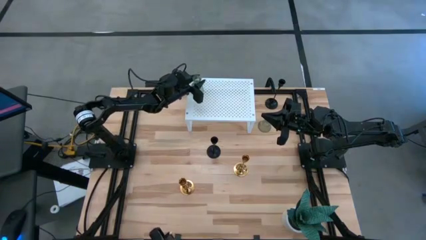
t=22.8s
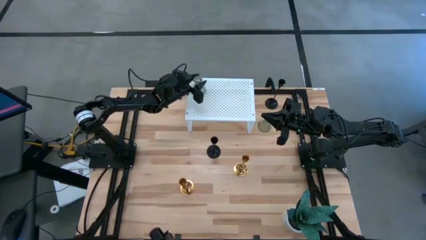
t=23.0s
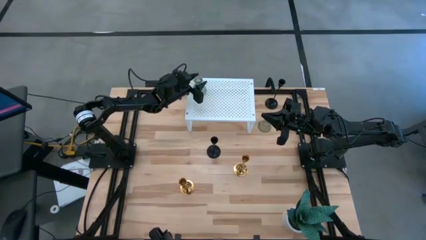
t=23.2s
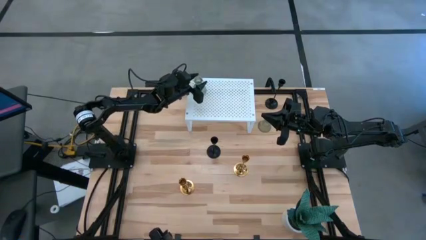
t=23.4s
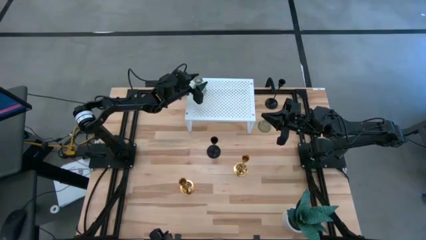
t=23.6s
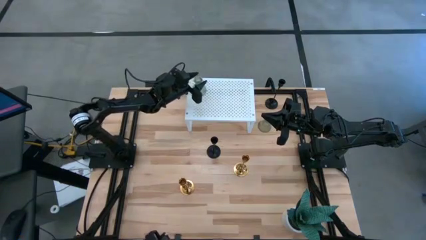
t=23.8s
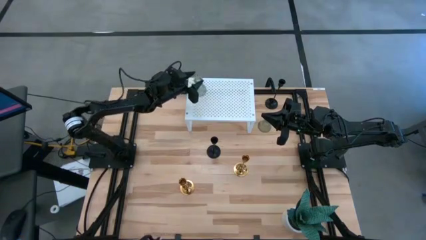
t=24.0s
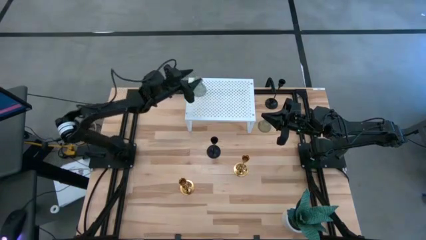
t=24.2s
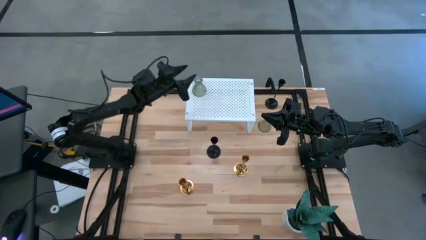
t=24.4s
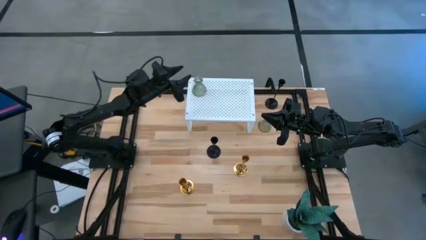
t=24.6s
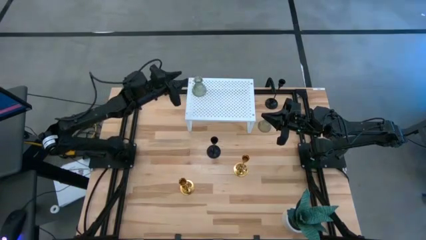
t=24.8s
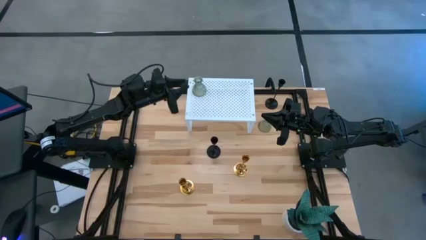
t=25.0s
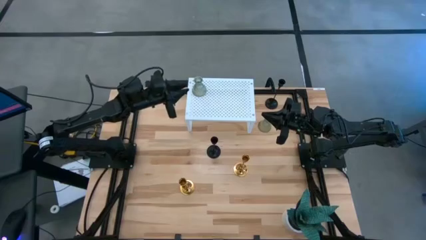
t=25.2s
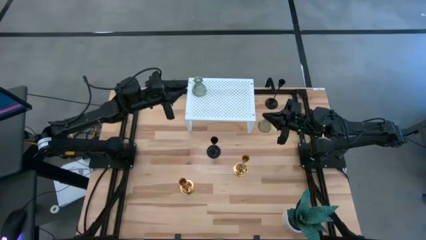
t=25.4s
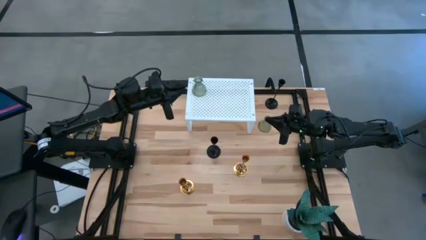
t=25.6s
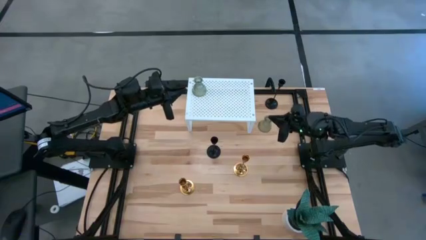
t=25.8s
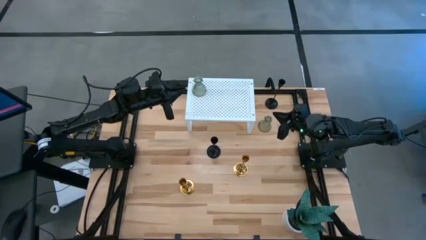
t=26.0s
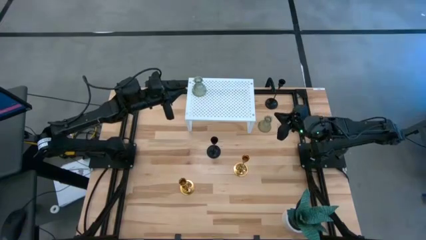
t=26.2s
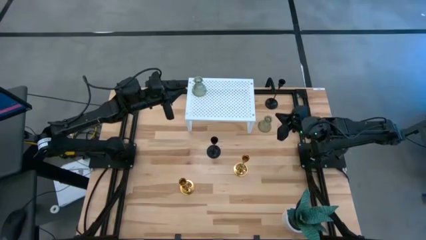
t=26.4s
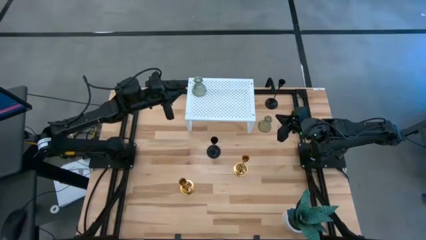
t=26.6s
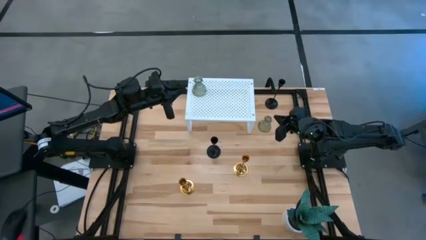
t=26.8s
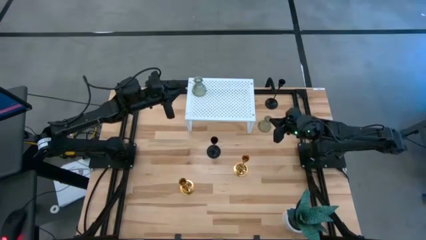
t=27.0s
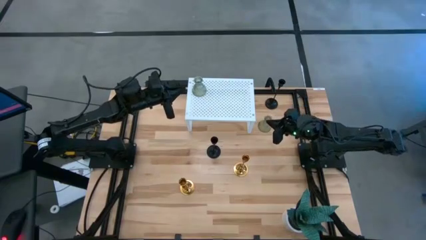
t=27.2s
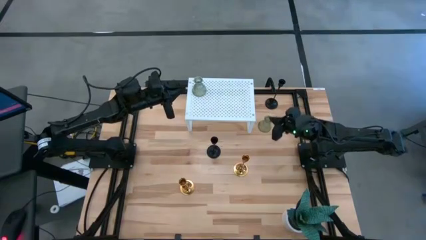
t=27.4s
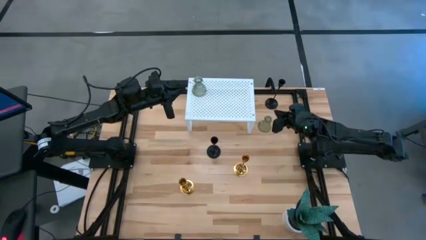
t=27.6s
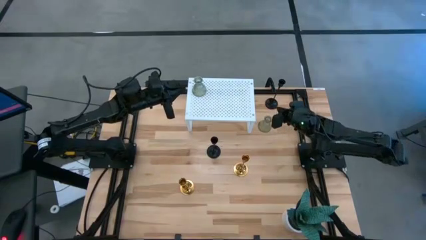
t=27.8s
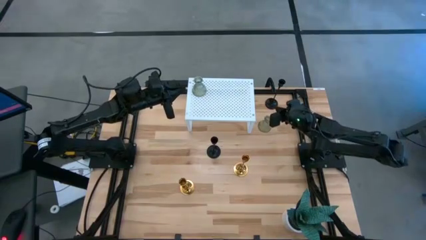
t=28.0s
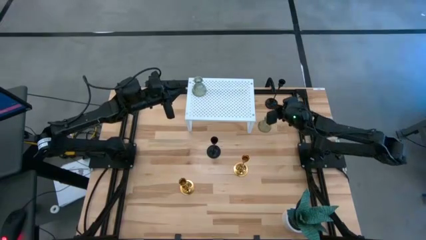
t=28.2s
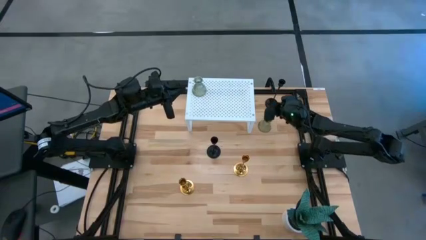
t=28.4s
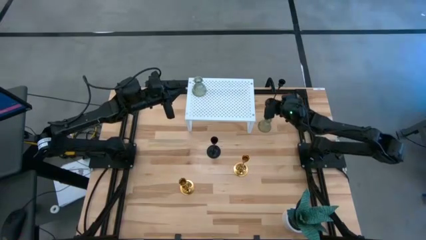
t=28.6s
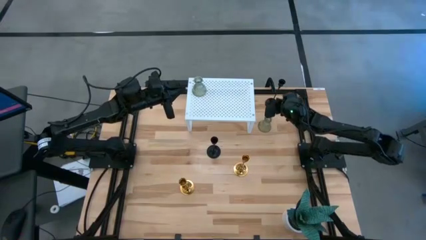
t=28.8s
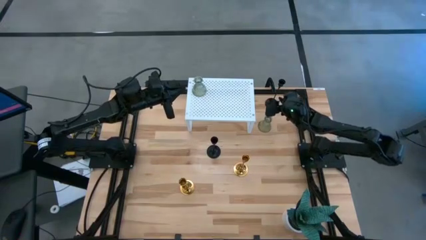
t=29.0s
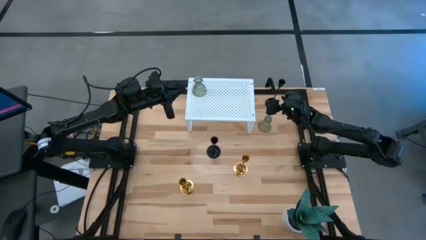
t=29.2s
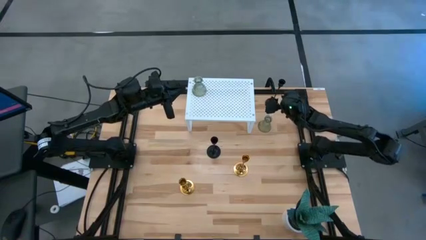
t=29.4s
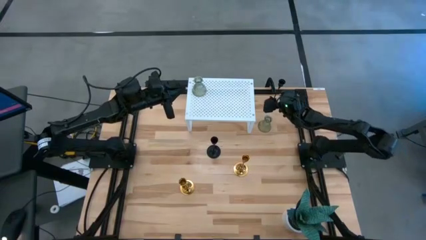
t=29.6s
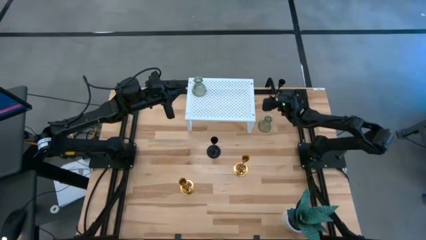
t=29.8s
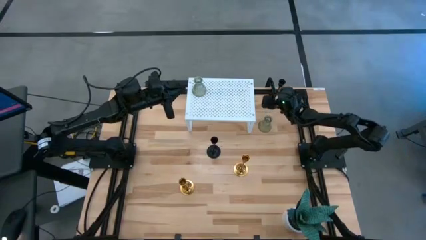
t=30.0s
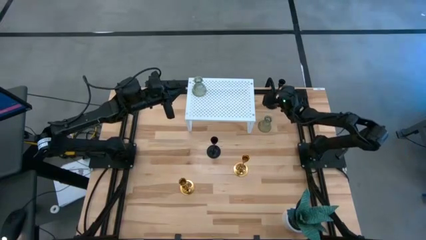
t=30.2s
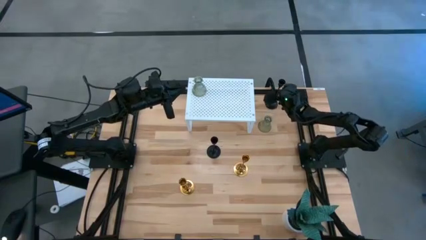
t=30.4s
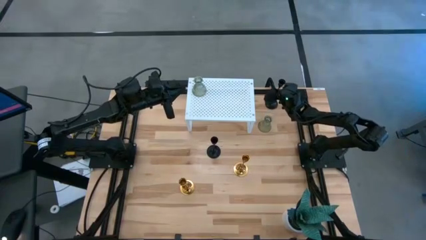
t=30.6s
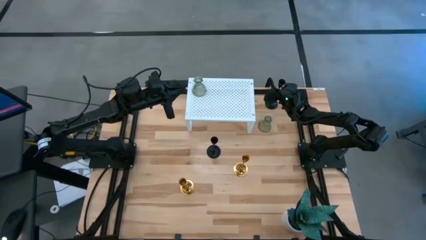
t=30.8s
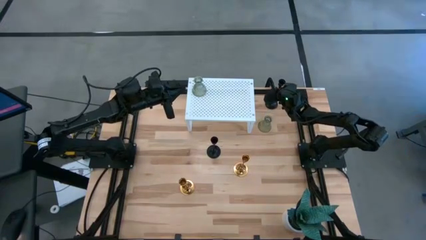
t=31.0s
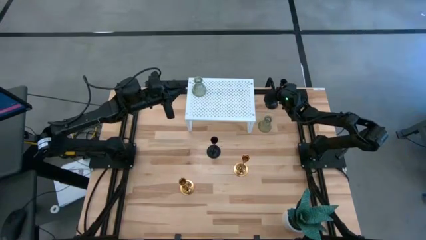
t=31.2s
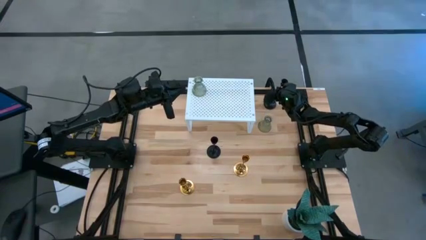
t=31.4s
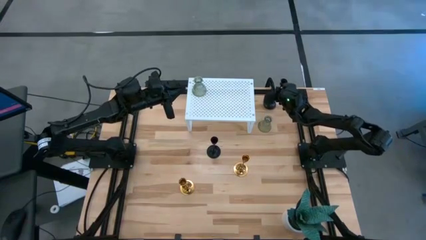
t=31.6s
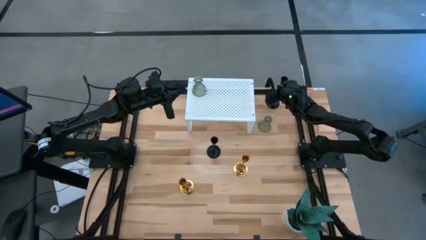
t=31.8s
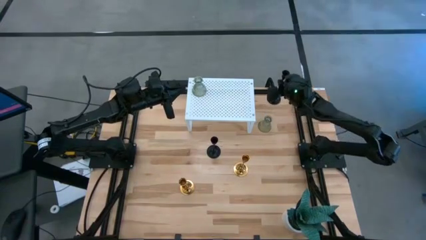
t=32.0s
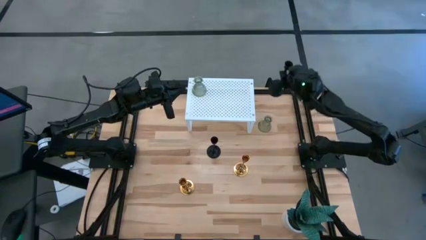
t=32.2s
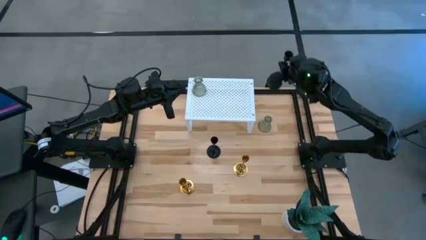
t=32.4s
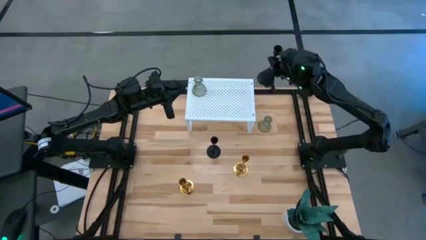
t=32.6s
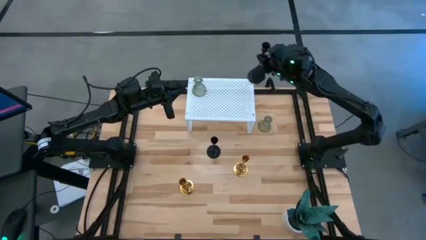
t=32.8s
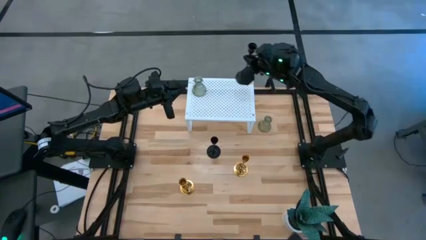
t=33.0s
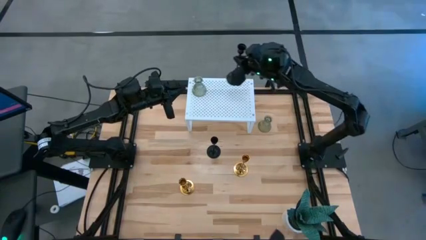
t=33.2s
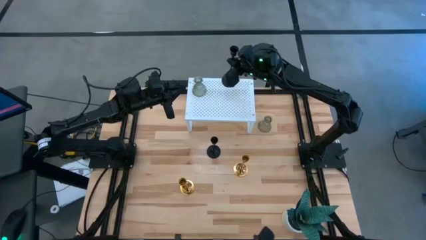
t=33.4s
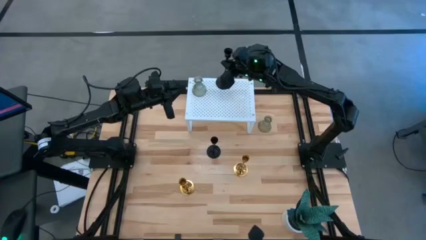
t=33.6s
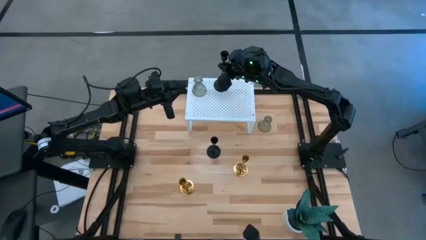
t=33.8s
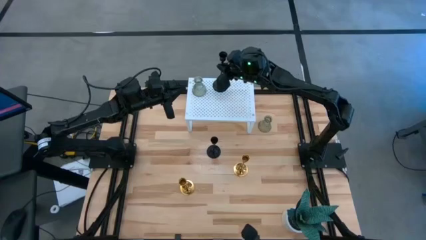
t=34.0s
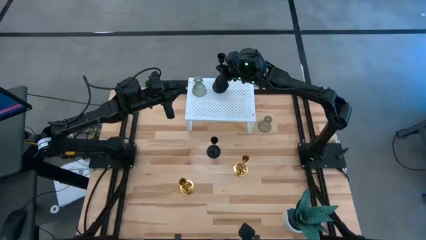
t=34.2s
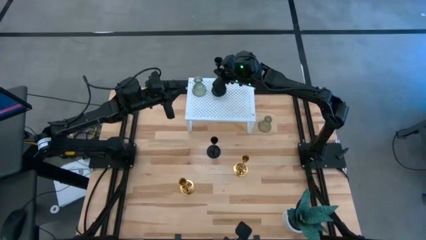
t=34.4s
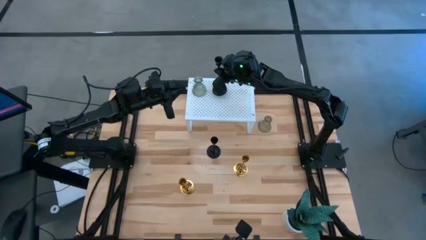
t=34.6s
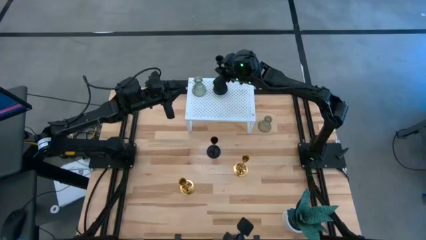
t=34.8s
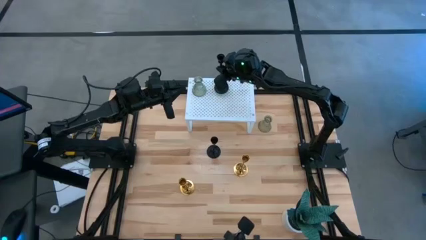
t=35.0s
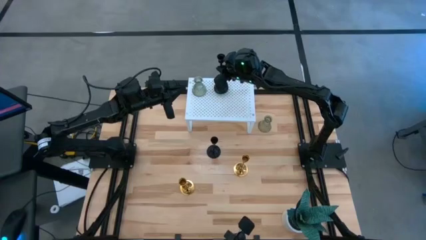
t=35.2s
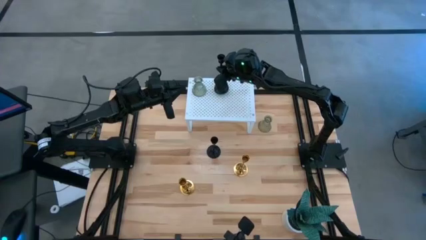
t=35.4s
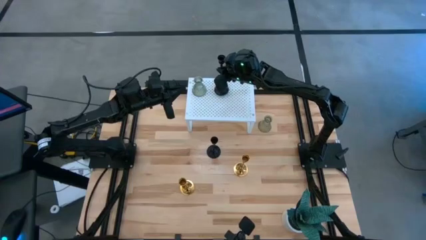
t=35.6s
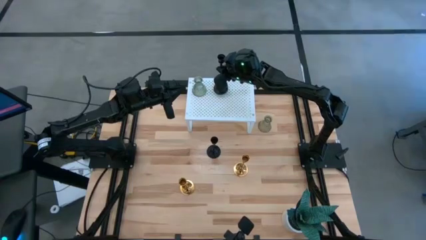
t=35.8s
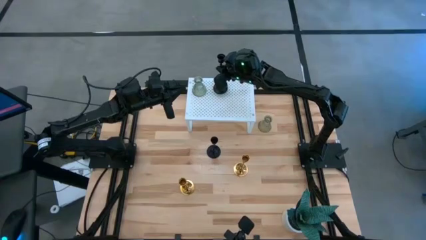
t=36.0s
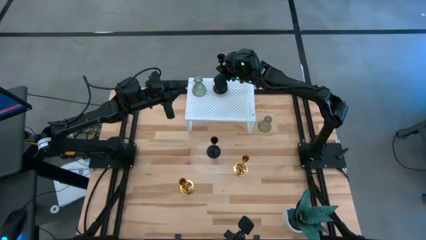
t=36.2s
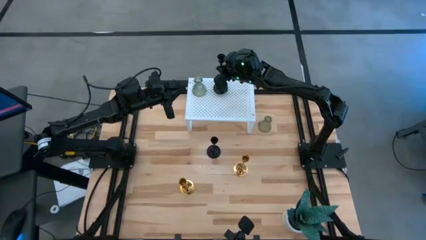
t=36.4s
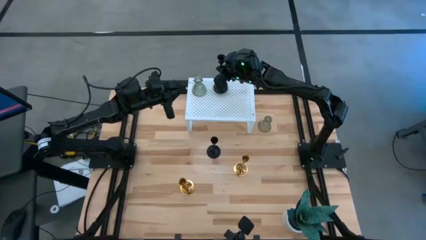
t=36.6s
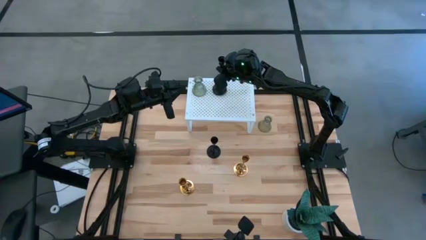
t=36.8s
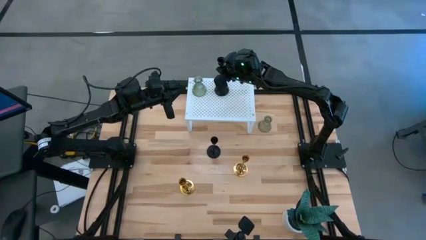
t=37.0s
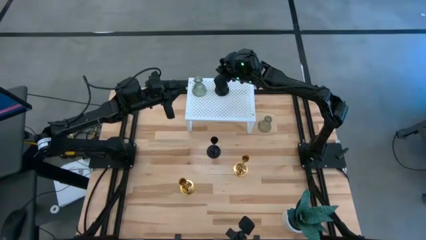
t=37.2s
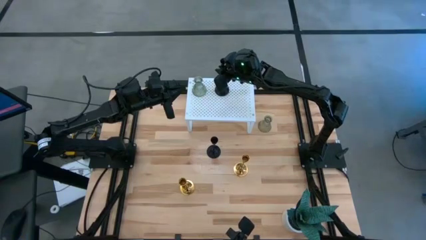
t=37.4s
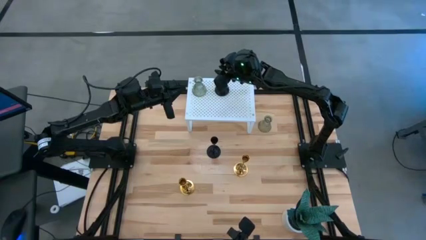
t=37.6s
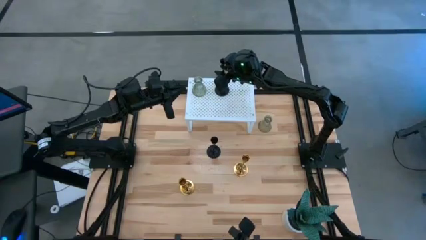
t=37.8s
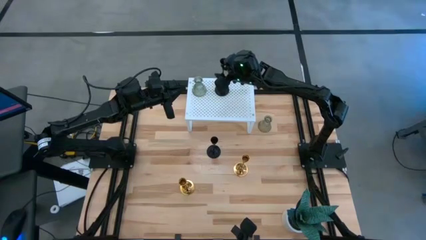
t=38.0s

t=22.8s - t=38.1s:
Task: Pick & Place candle stick holders
Put the top black candle holder on the shelf
